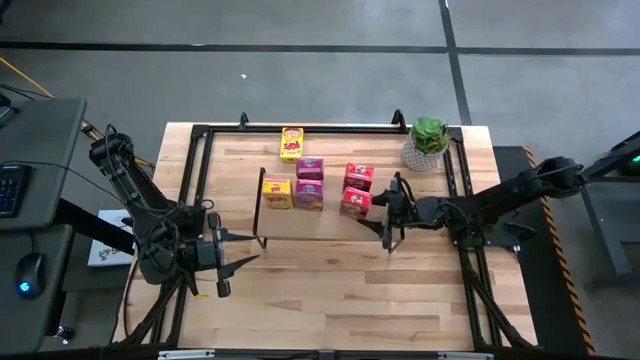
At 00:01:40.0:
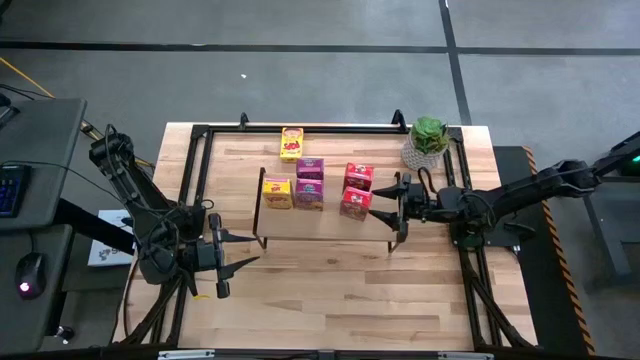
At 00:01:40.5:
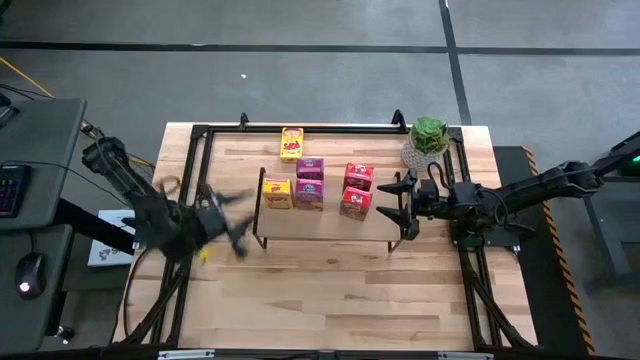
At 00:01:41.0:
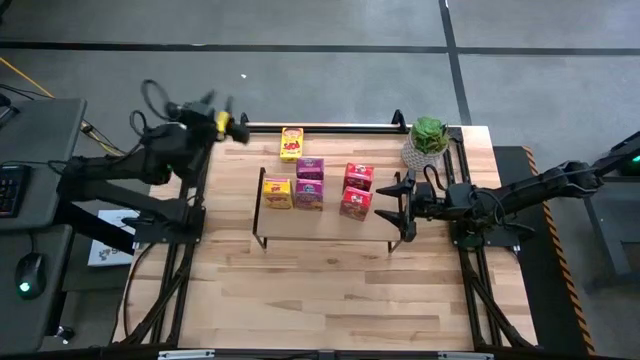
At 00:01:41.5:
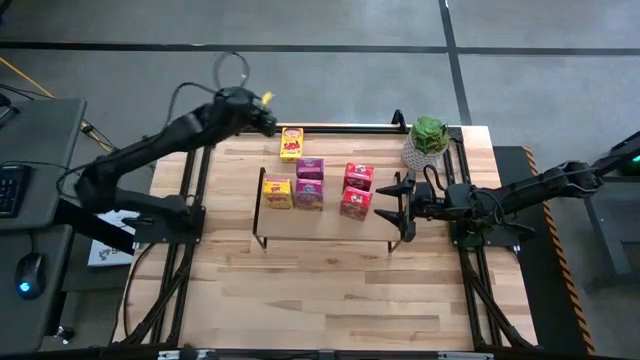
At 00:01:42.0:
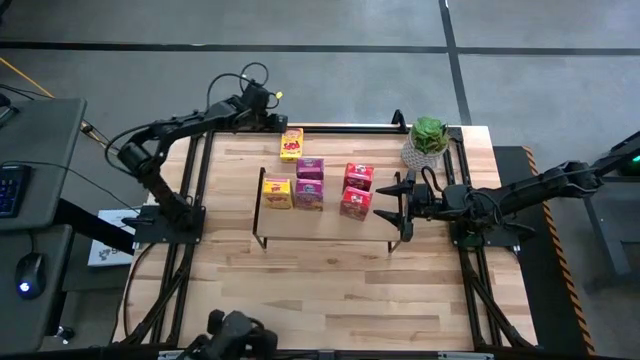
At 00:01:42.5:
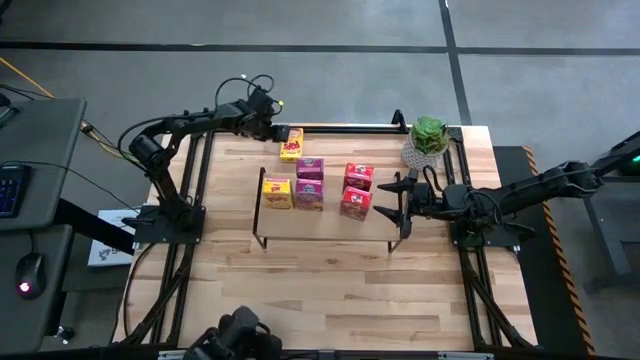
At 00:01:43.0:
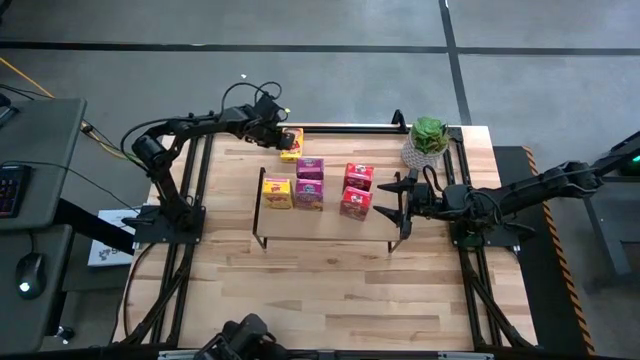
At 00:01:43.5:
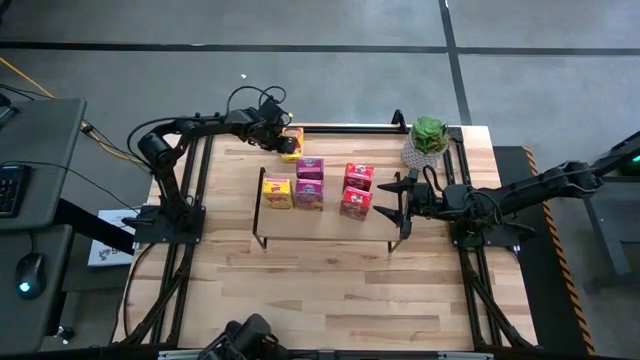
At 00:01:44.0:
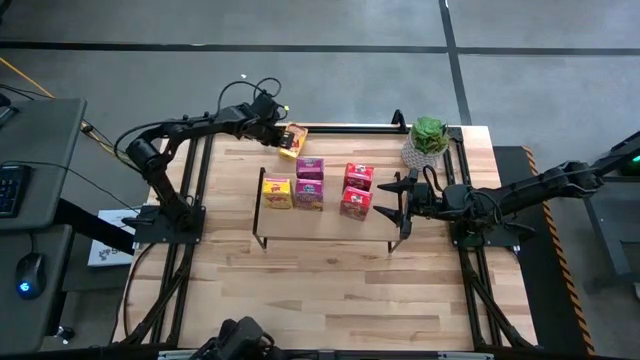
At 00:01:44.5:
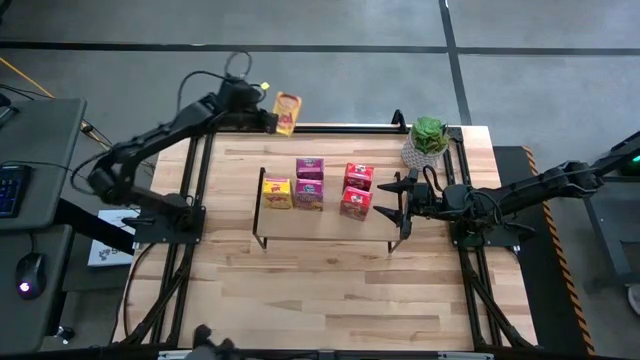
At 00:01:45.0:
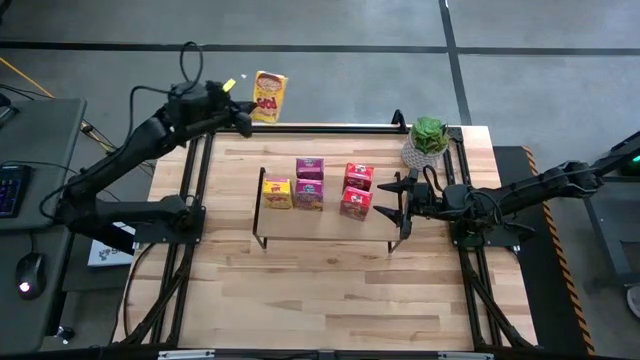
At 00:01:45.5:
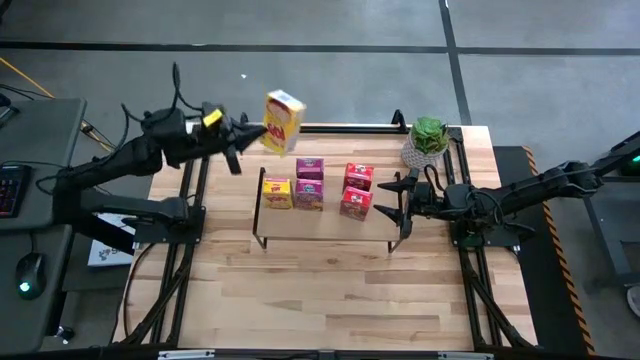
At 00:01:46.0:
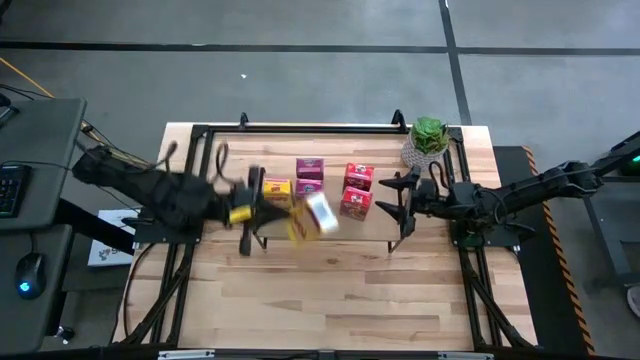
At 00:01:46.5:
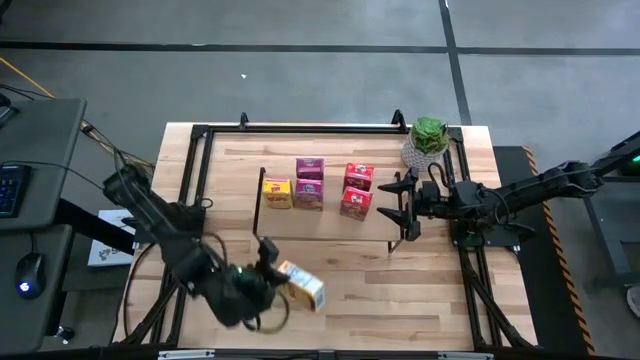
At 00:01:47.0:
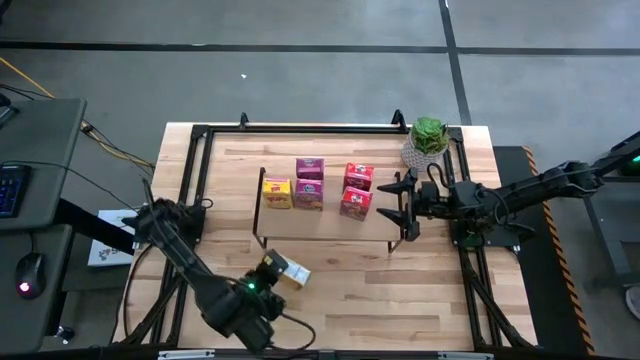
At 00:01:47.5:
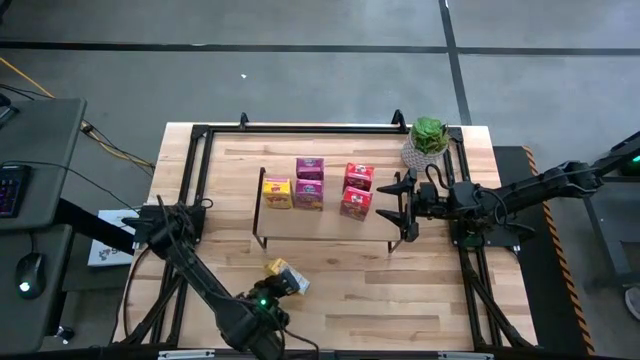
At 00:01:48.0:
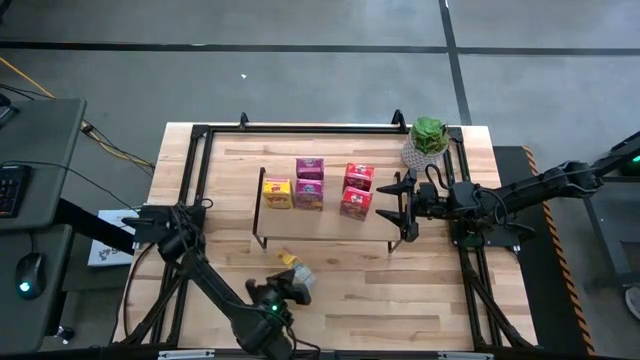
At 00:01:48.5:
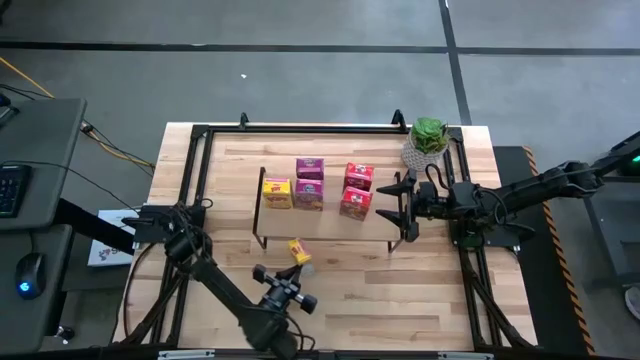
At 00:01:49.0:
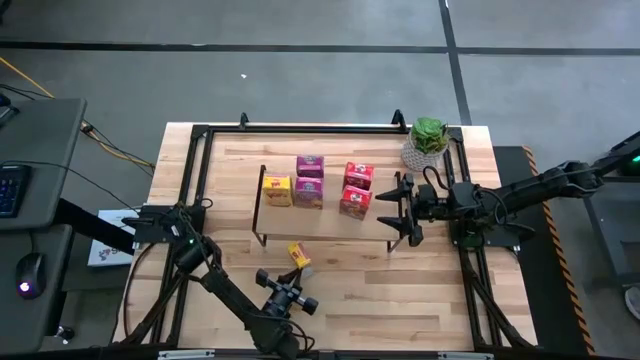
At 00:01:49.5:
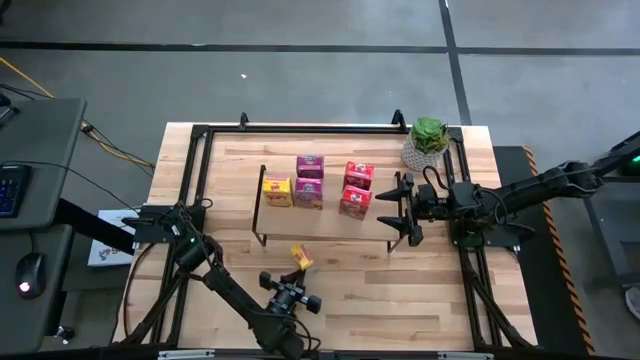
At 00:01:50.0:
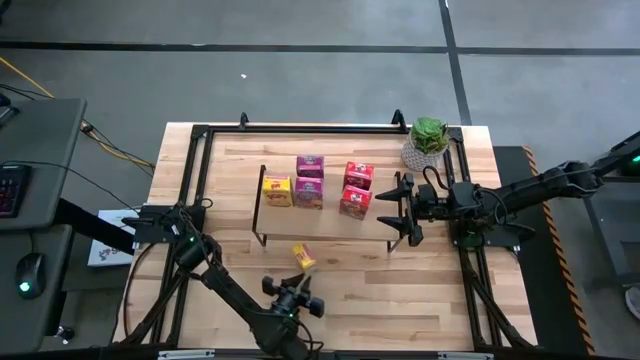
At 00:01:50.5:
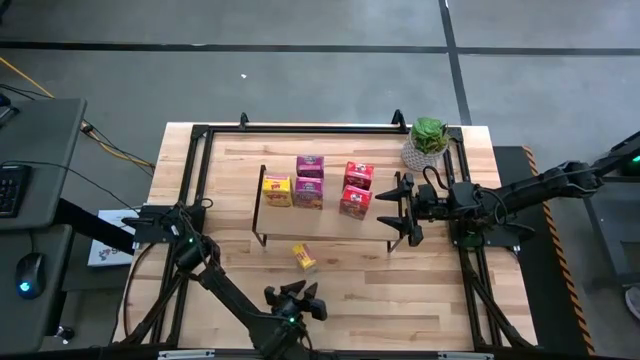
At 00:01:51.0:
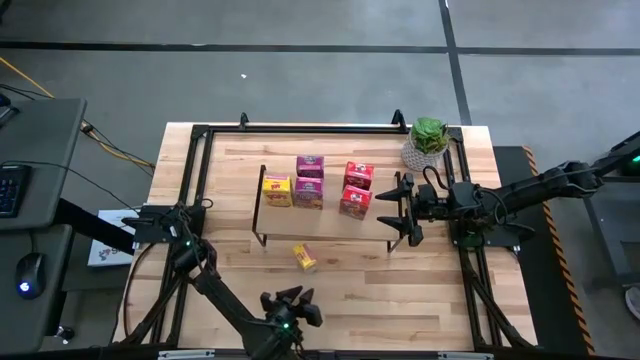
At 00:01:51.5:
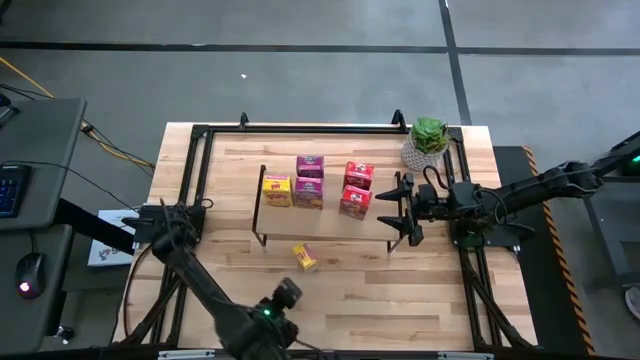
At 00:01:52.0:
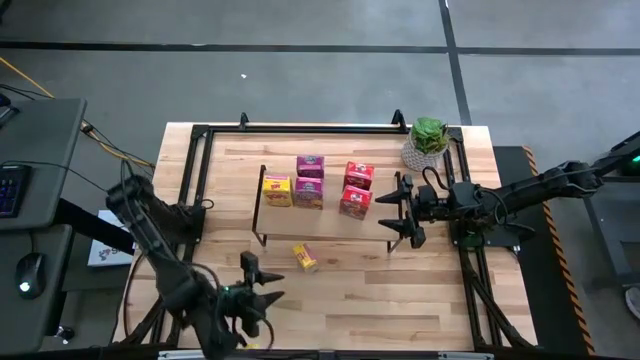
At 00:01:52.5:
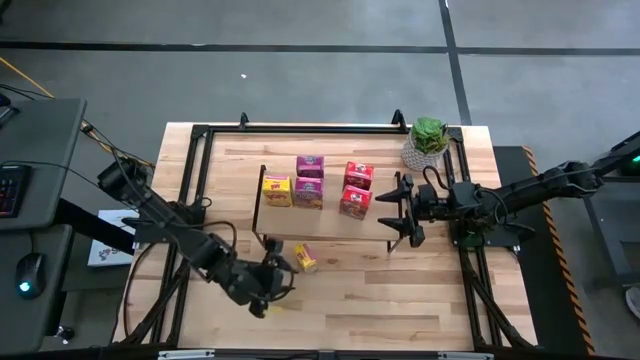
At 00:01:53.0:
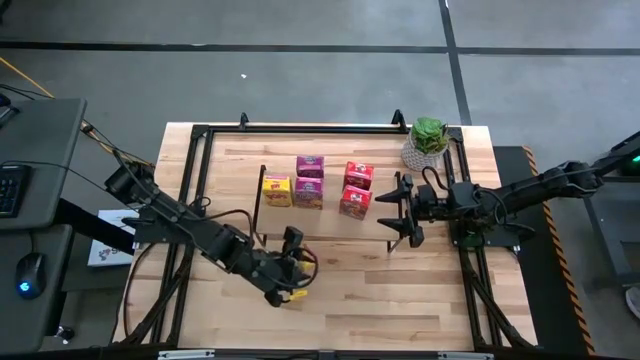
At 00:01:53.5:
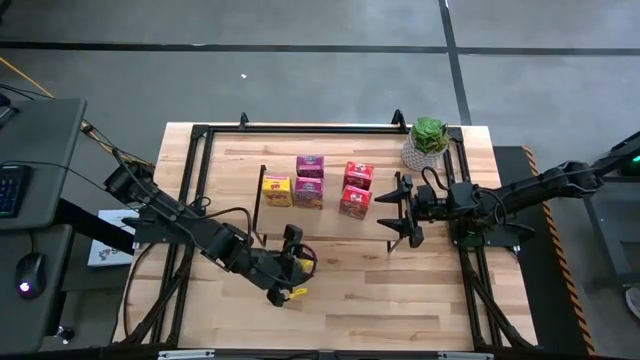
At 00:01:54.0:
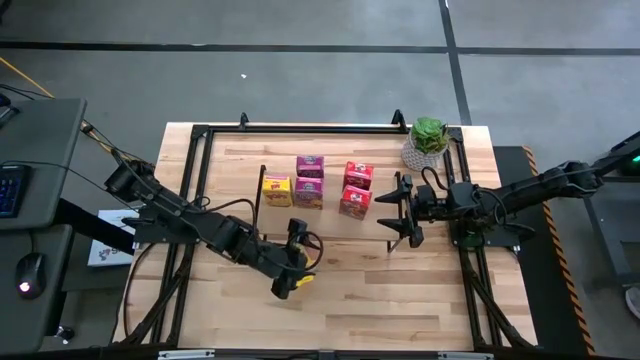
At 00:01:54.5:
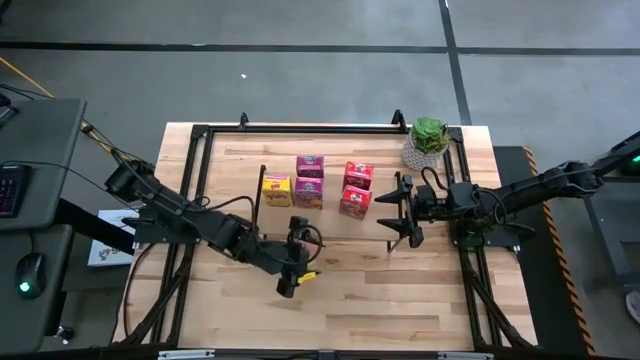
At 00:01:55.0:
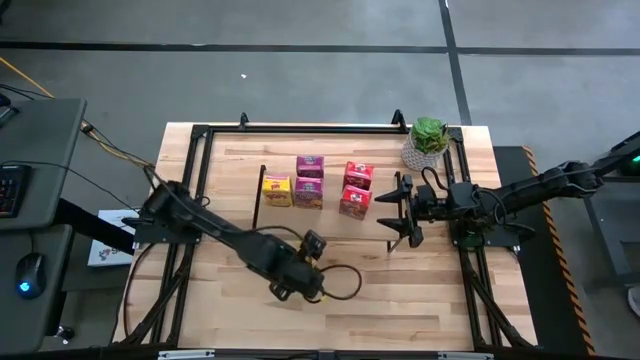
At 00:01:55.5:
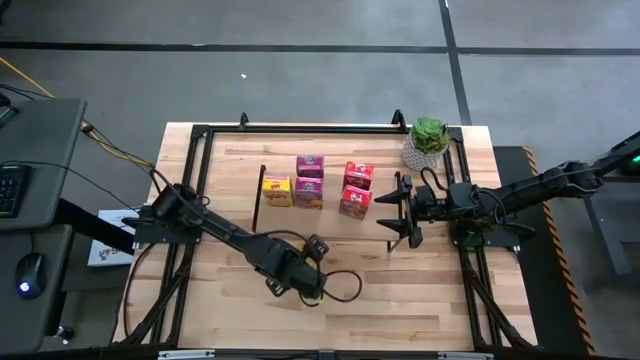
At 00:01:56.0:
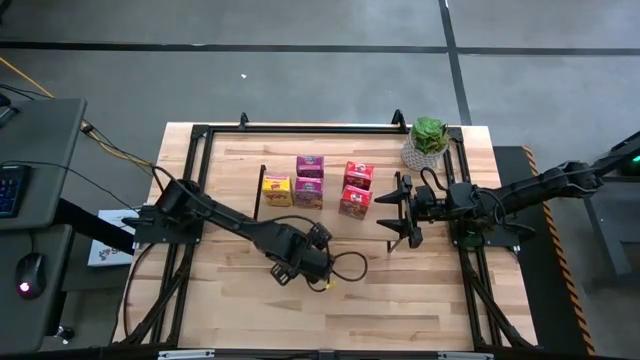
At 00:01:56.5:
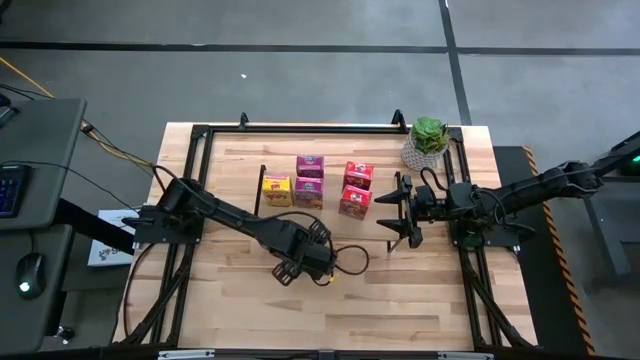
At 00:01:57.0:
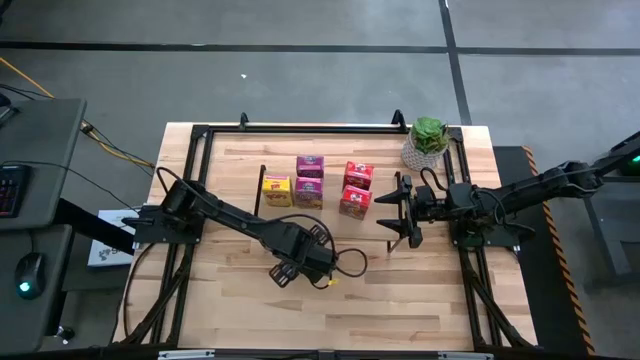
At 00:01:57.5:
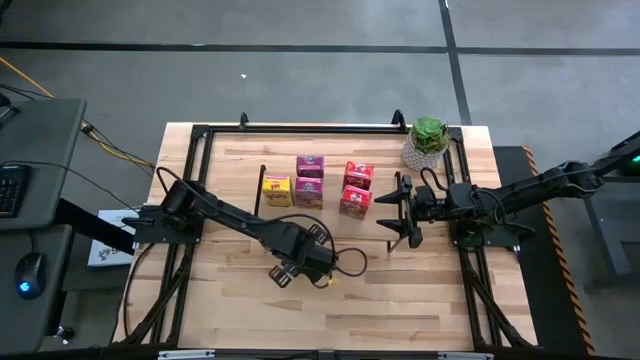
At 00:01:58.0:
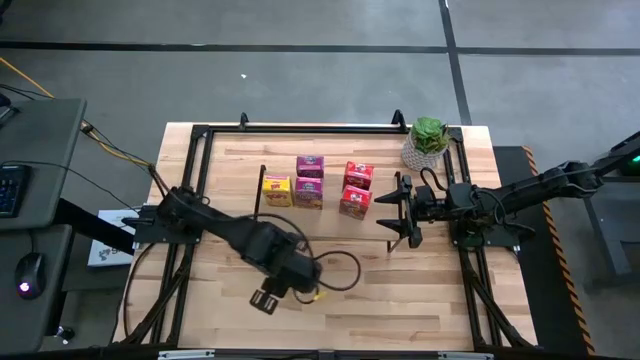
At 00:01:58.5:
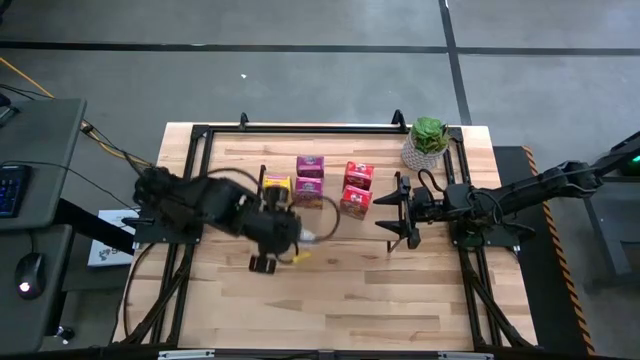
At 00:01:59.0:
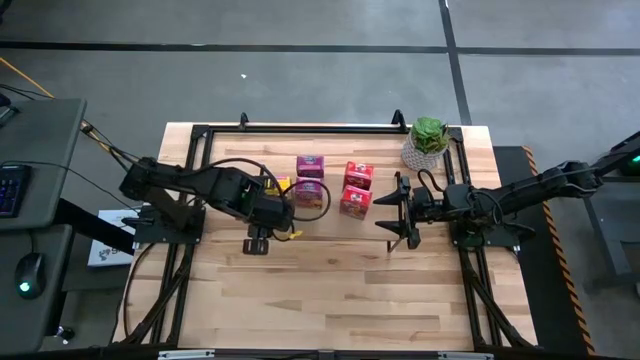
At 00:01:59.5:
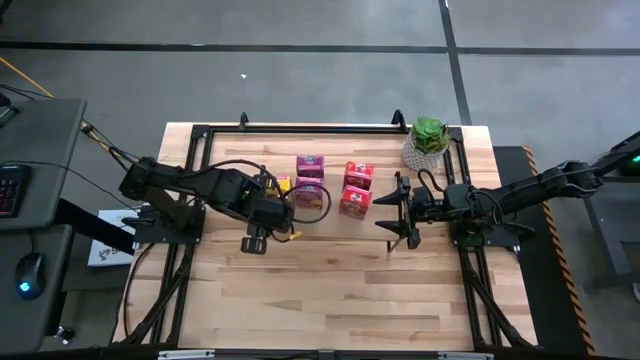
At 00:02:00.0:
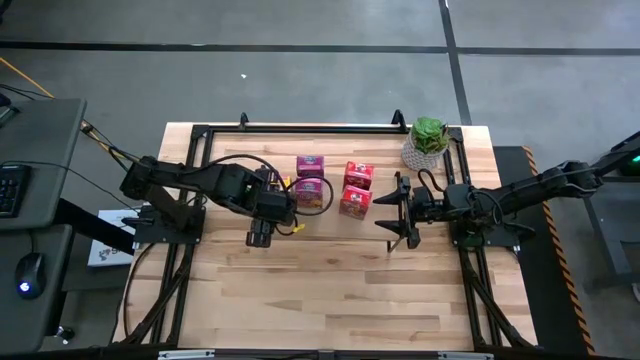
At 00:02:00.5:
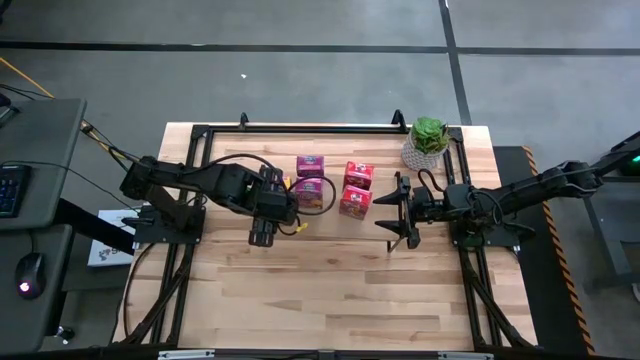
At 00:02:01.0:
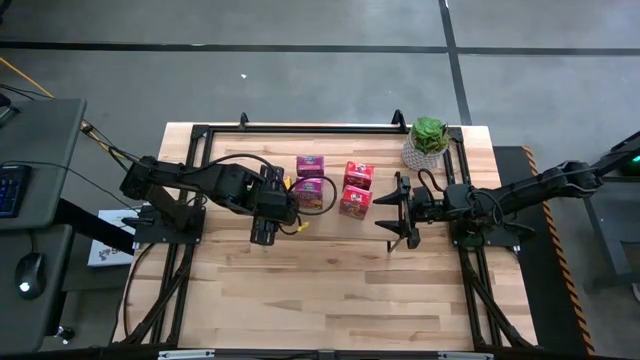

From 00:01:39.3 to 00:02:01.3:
Task: Stack cereal on shelf
Put the yellow cereal box on the shelf
